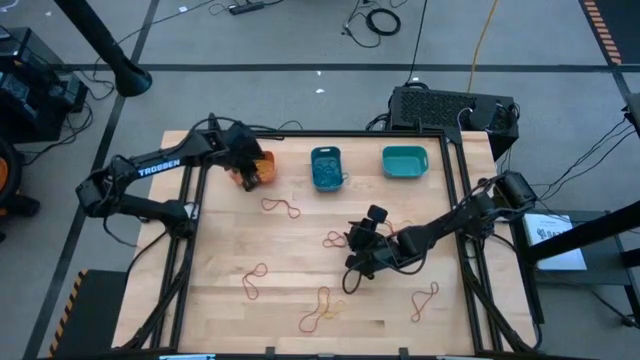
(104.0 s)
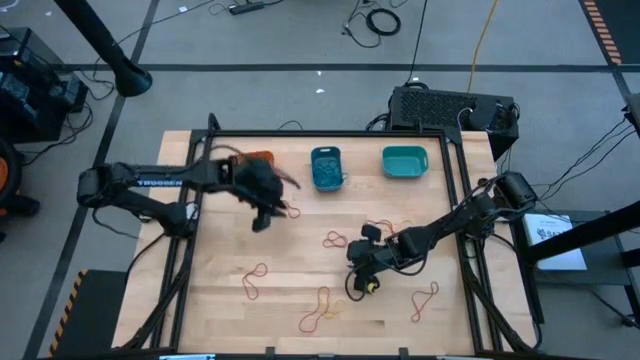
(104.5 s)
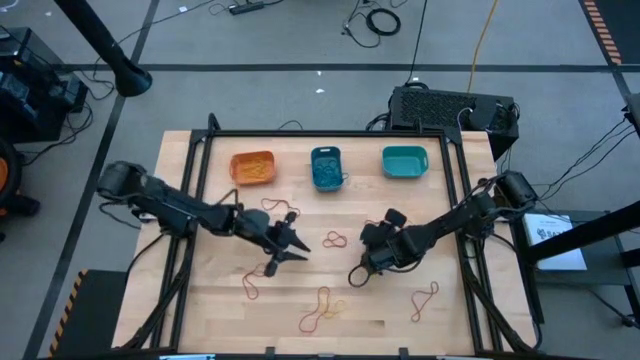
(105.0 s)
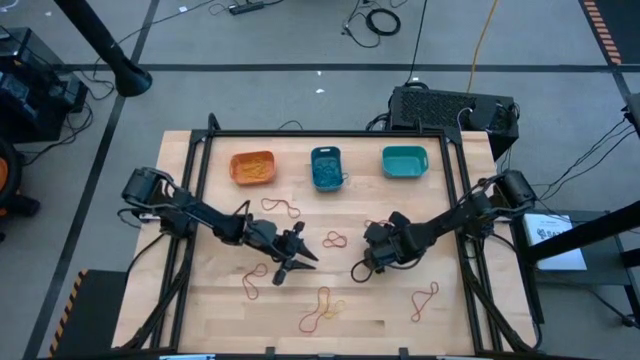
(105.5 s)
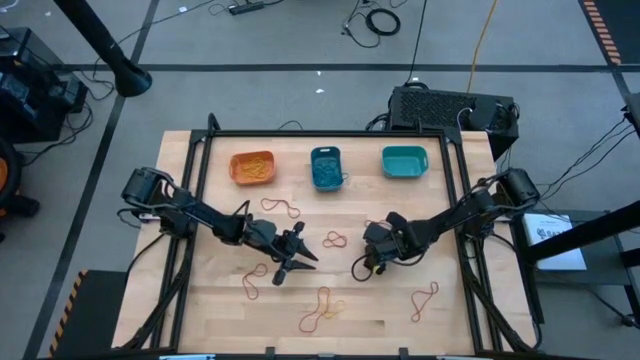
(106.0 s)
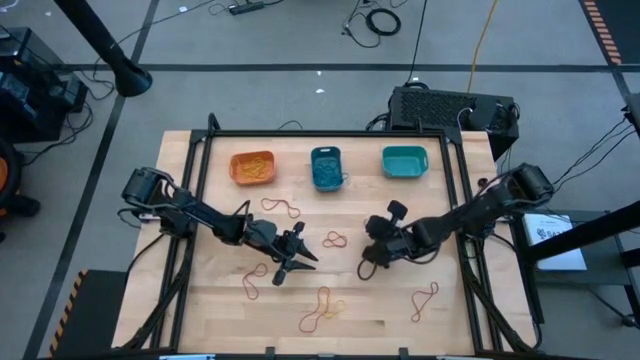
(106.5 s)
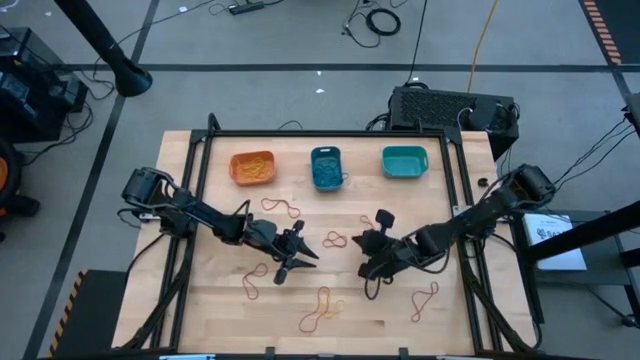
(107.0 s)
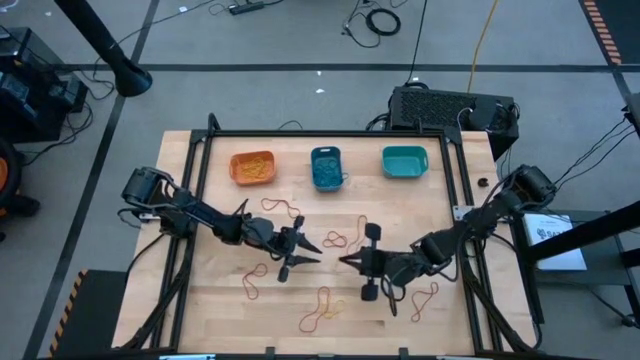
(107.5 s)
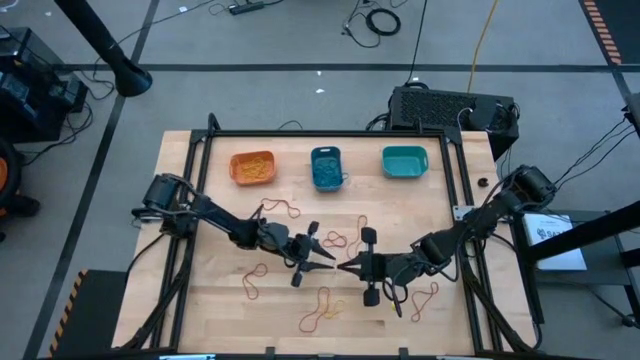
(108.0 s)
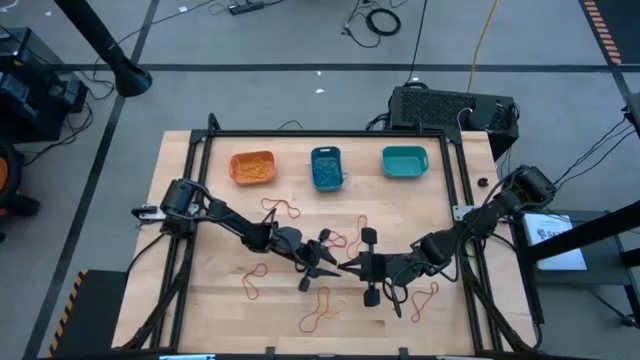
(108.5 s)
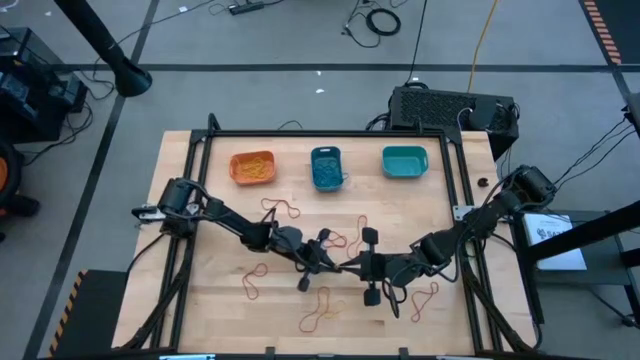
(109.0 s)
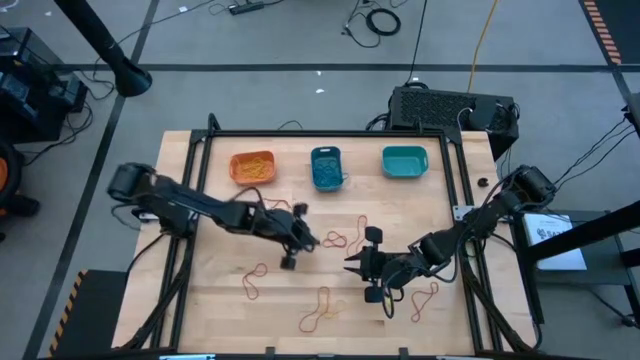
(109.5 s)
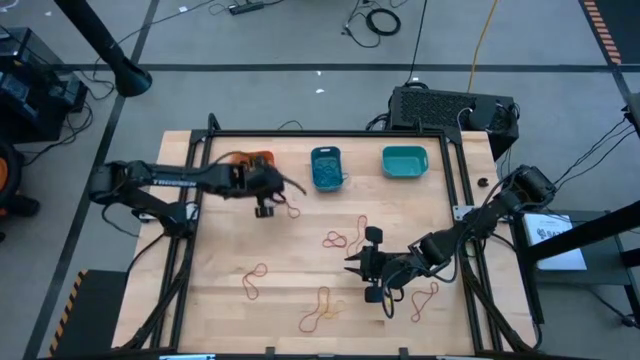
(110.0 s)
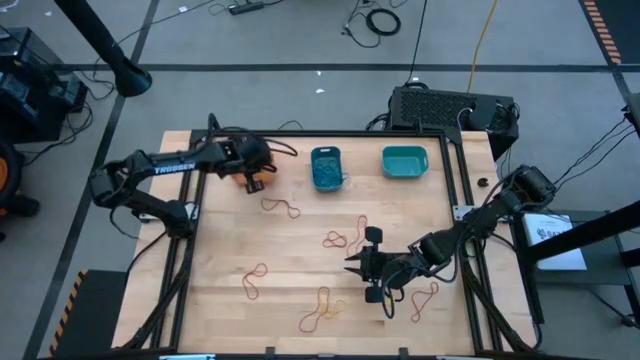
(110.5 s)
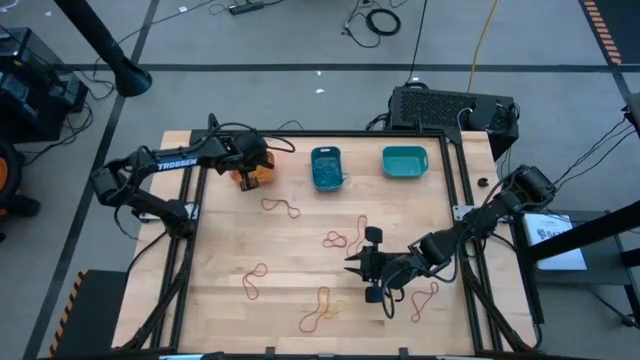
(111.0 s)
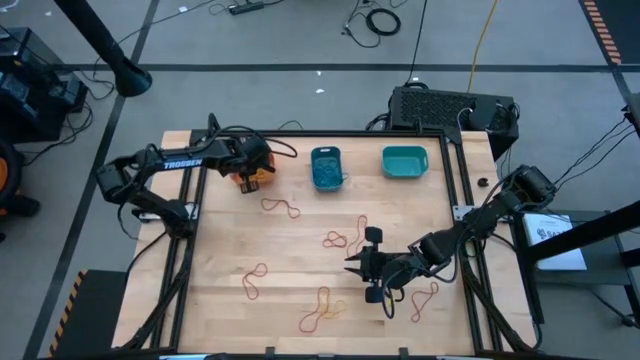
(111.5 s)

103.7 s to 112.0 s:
Task: Sort rubber bands into baskets
Put the yellow rubber band into the orange bin

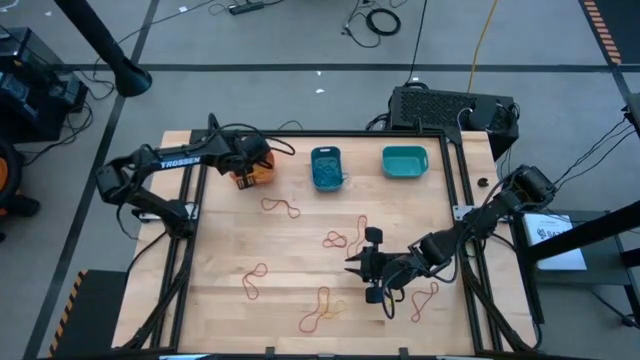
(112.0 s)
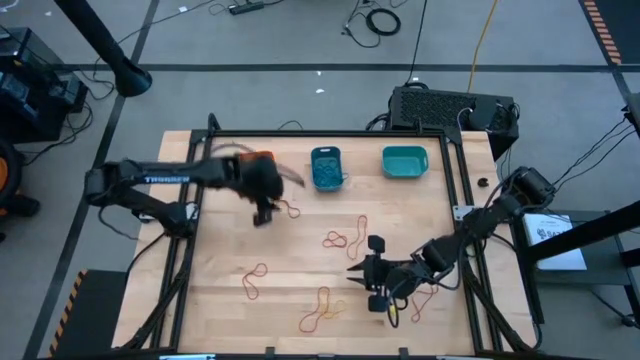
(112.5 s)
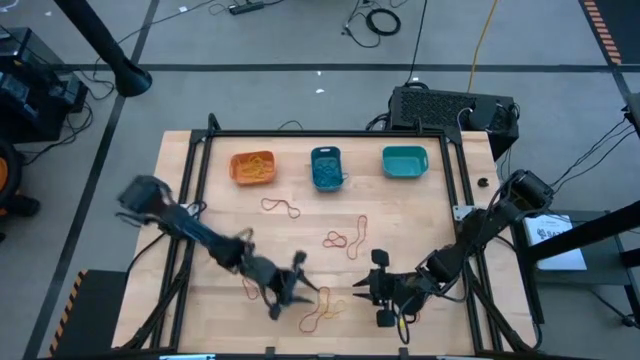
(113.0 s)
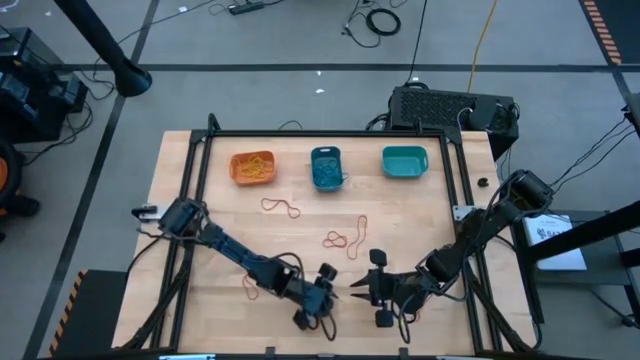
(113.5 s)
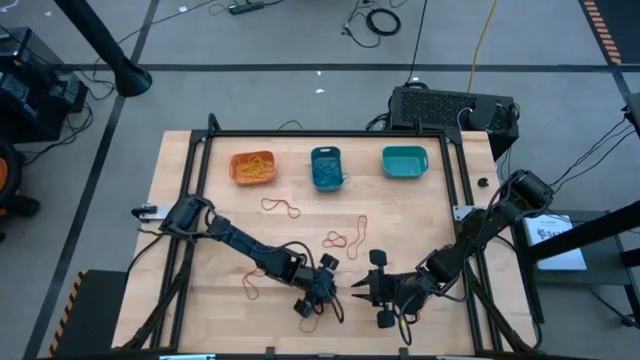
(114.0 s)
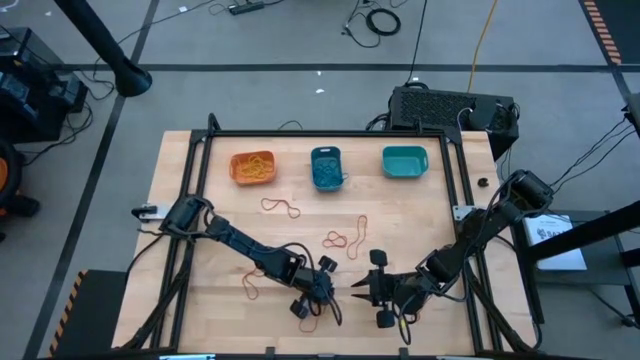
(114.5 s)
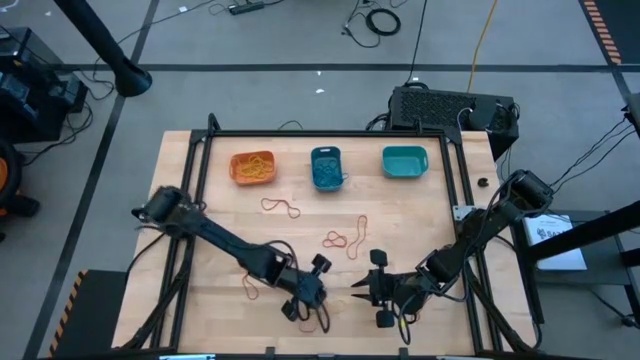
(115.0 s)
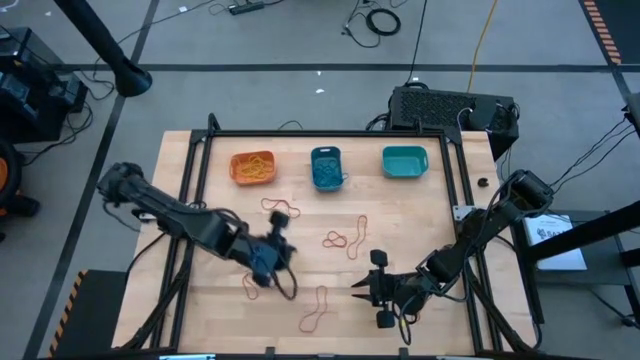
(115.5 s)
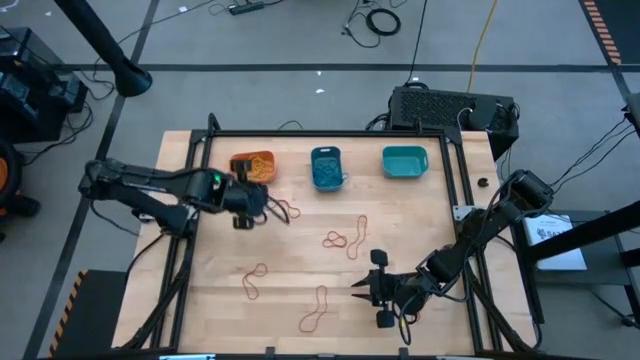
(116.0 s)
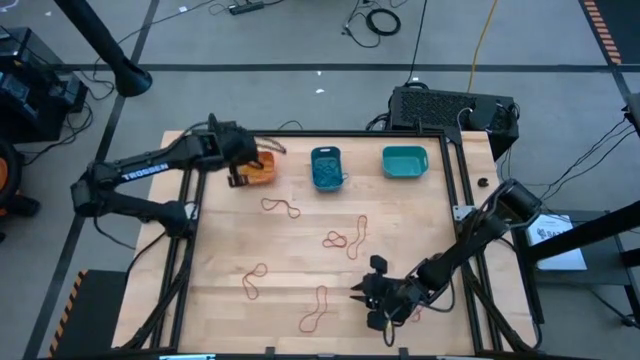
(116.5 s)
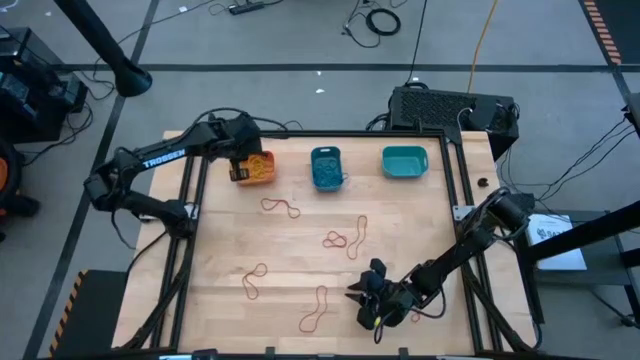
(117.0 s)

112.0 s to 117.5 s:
Put the yellow rubber band into the orange bin

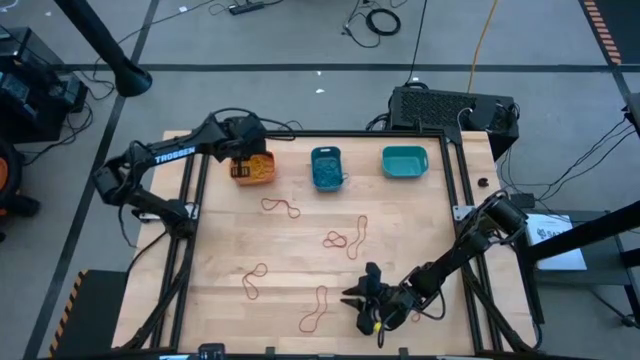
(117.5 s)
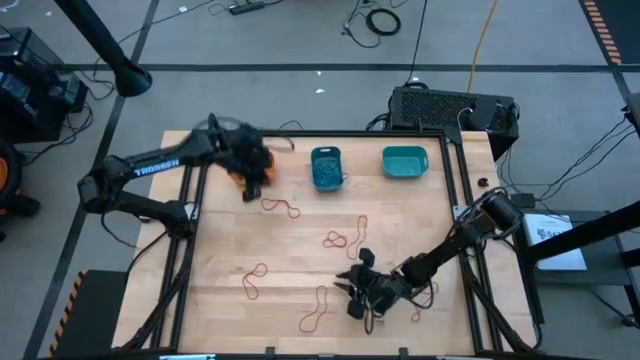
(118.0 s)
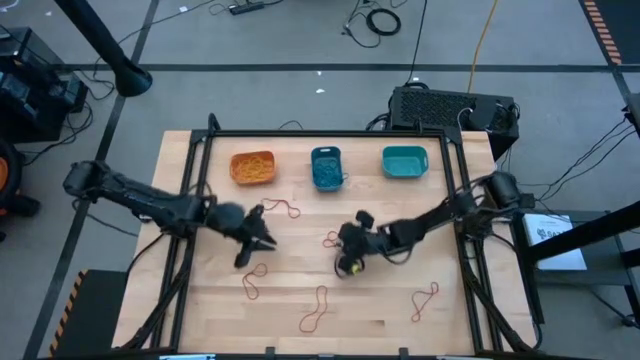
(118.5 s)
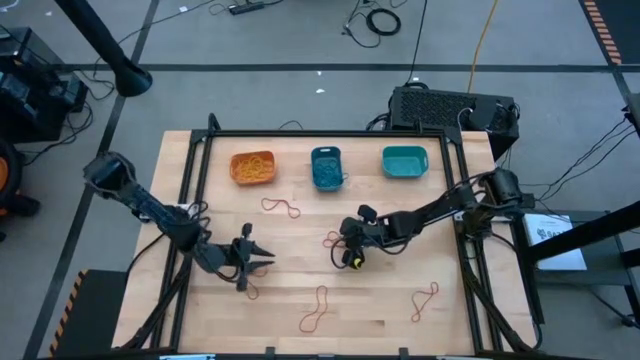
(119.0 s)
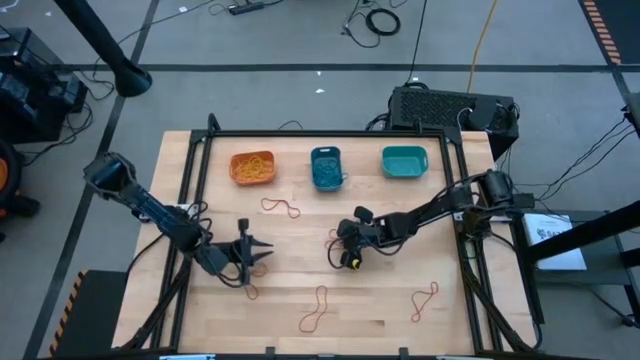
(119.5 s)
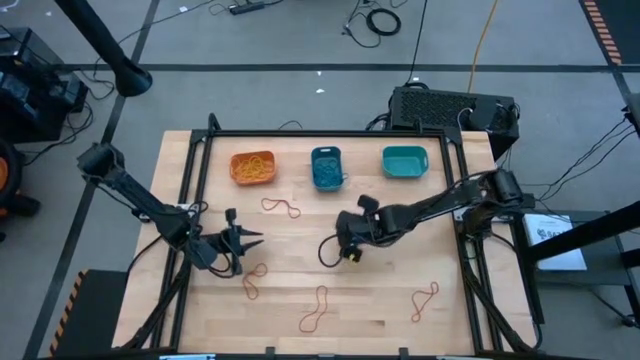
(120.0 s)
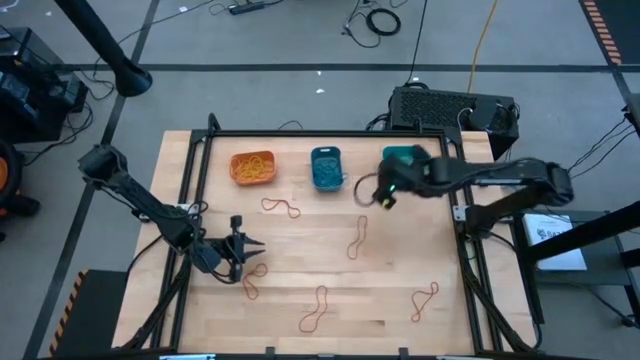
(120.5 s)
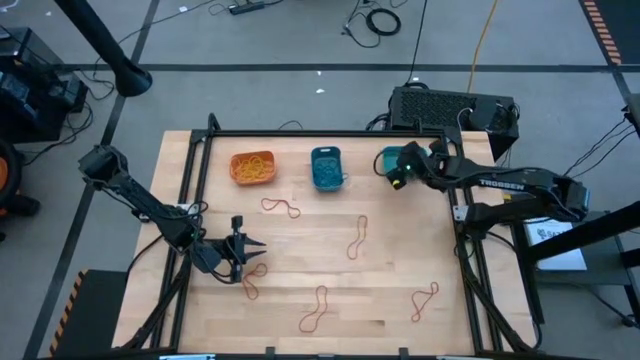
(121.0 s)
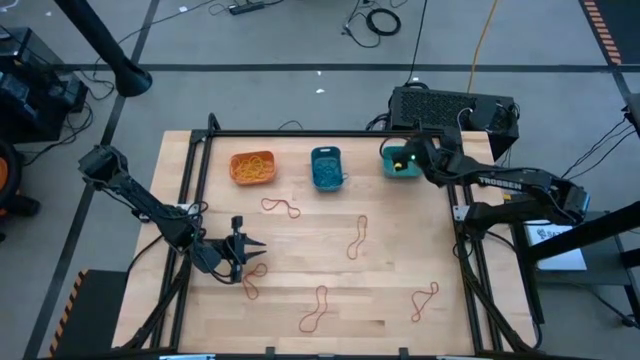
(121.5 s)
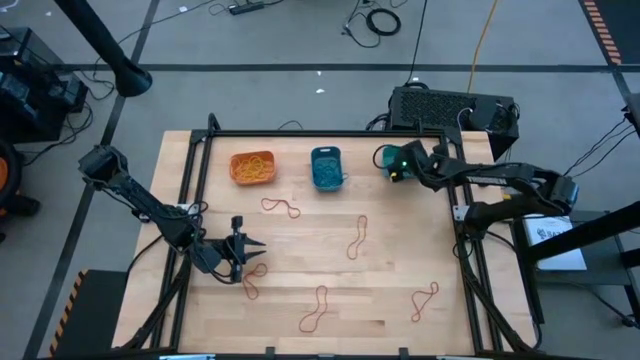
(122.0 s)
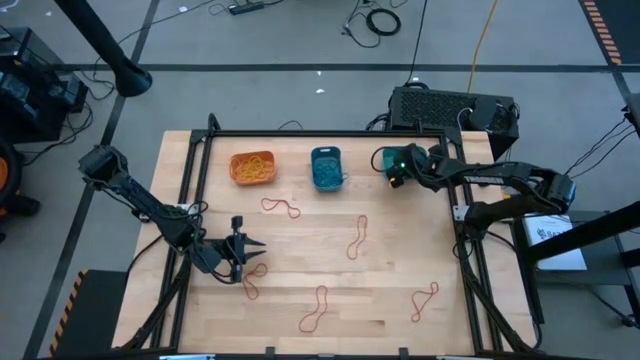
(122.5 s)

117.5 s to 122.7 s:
Put the red rubber band into the green bin

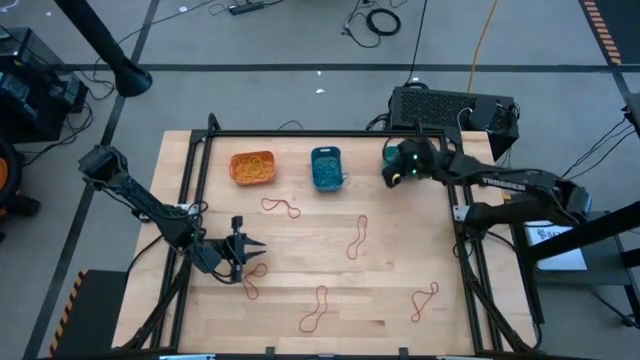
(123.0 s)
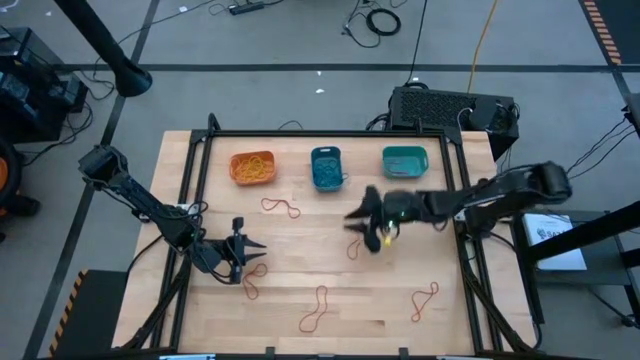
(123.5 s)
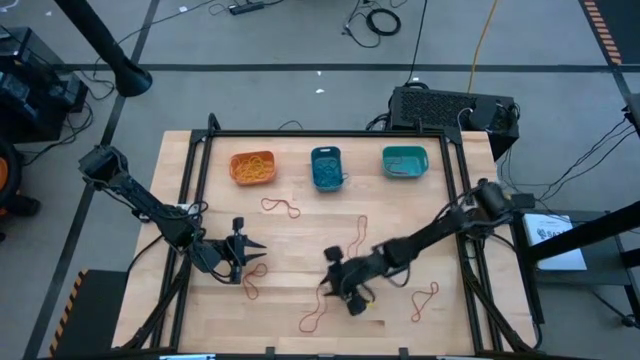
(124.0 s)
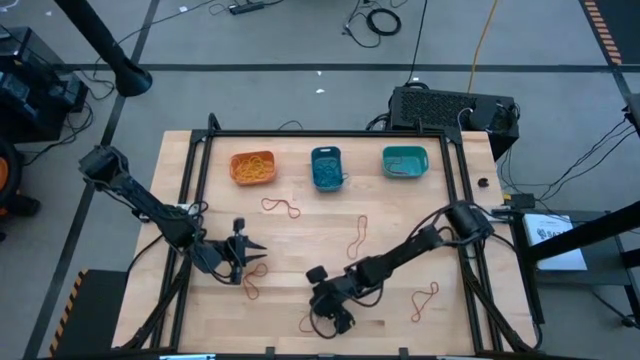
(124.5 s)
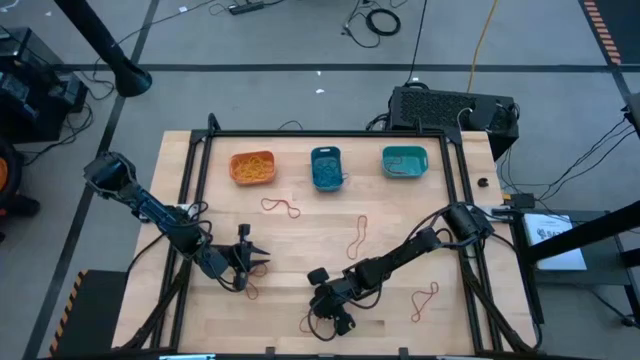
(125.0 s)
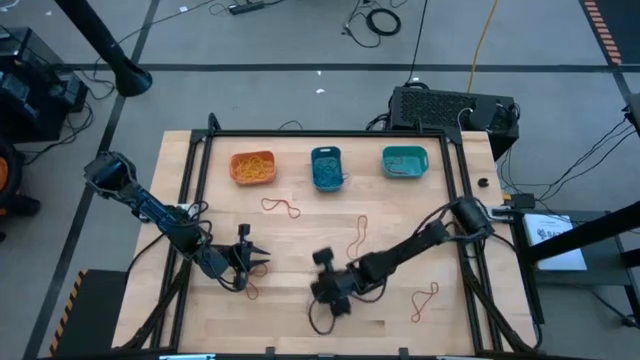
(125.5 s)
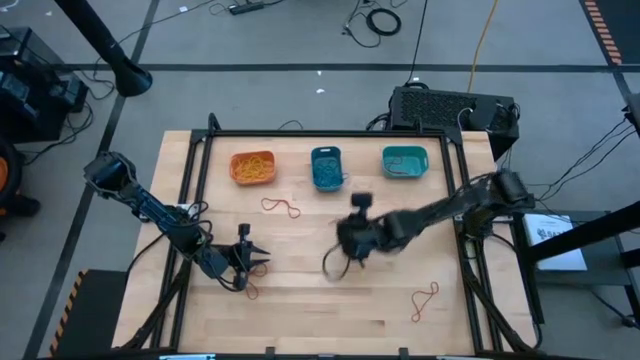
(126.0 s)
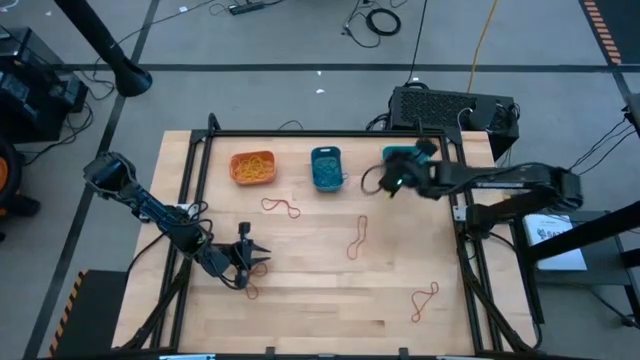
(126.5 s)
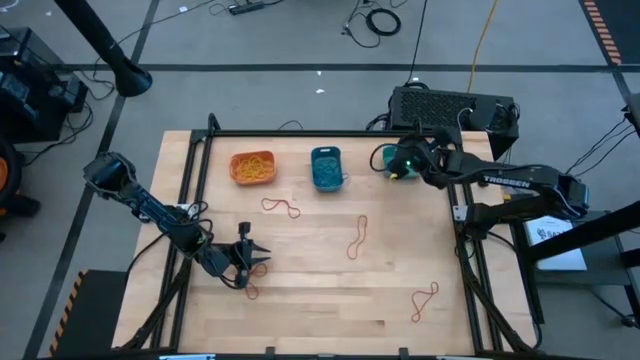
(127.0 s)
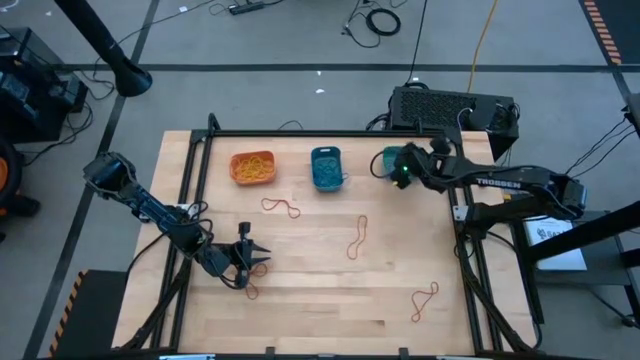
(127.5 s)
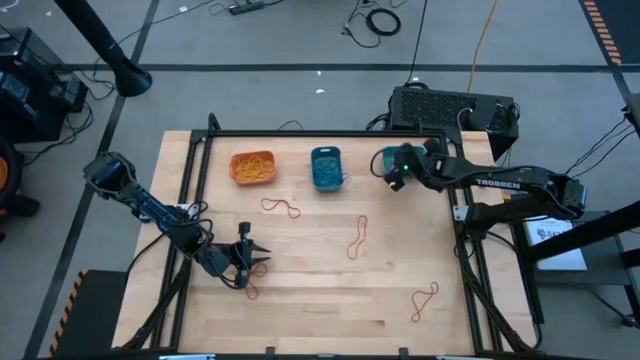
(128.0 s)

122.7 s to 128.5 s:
Put the red rubber band into the green bin
